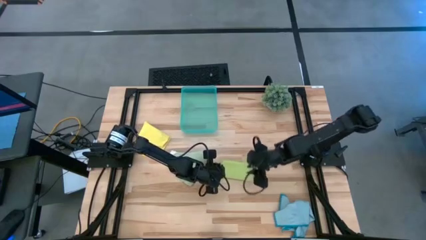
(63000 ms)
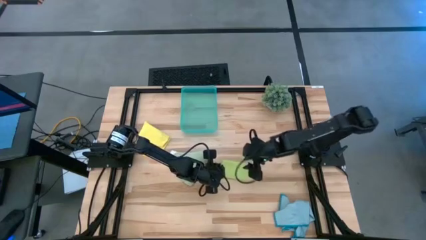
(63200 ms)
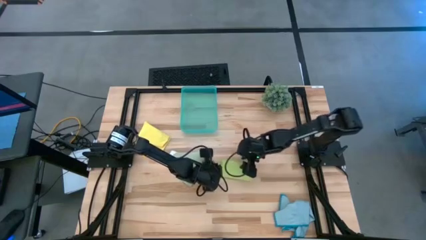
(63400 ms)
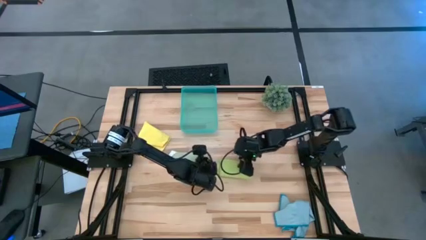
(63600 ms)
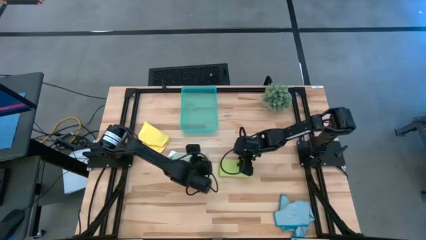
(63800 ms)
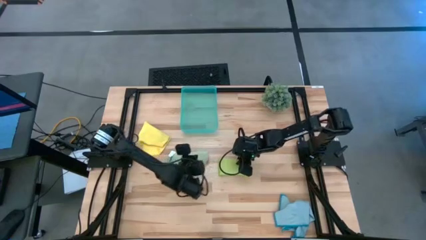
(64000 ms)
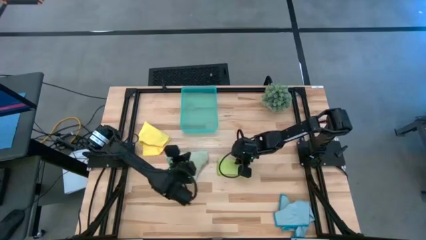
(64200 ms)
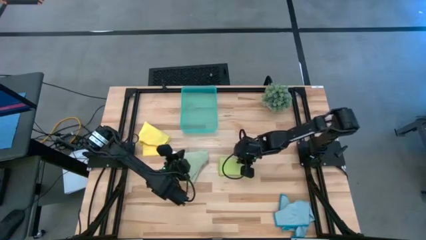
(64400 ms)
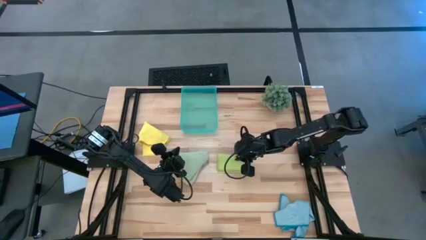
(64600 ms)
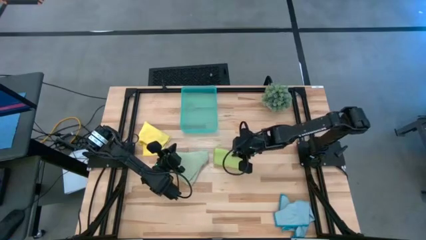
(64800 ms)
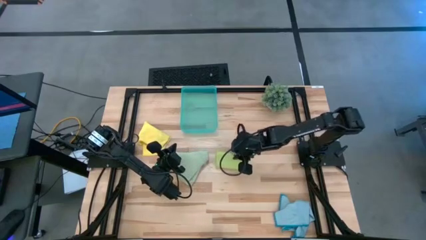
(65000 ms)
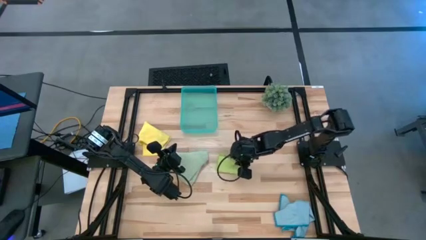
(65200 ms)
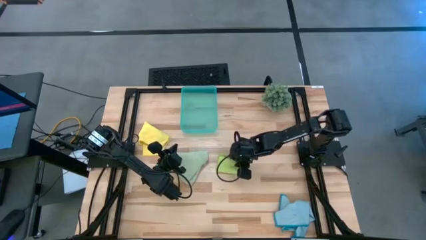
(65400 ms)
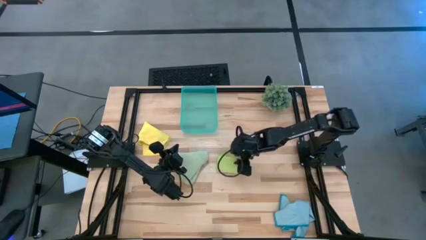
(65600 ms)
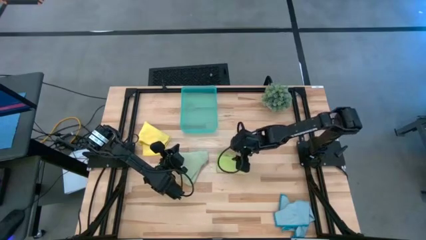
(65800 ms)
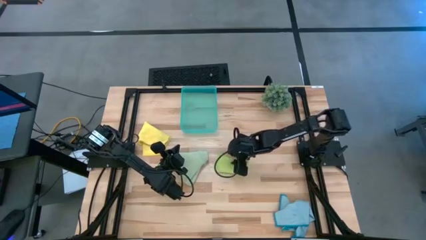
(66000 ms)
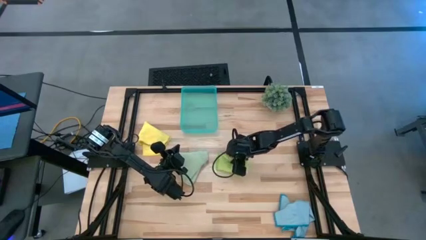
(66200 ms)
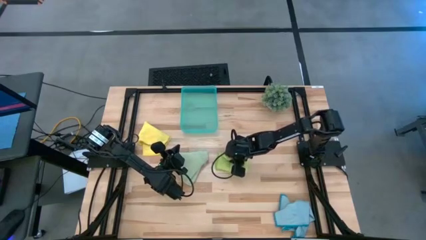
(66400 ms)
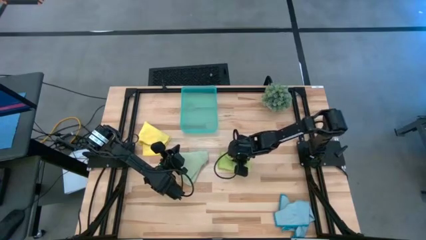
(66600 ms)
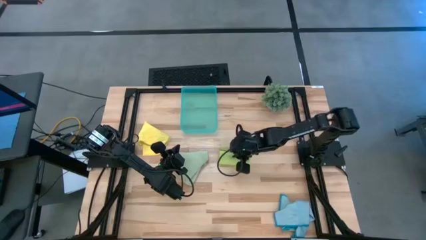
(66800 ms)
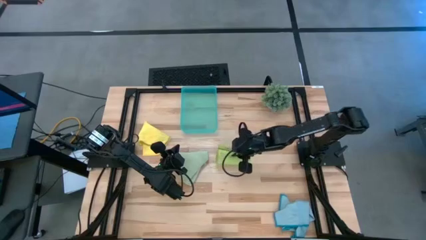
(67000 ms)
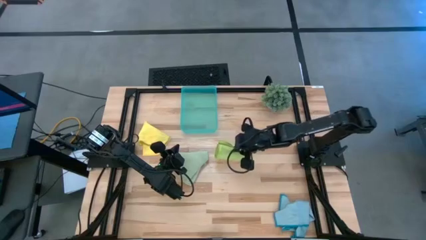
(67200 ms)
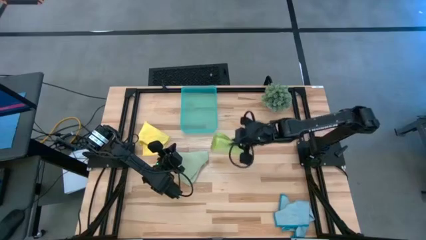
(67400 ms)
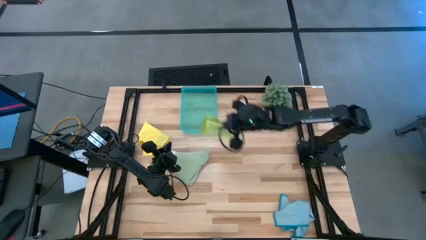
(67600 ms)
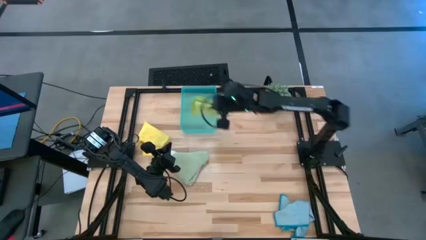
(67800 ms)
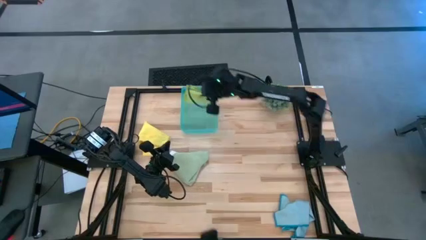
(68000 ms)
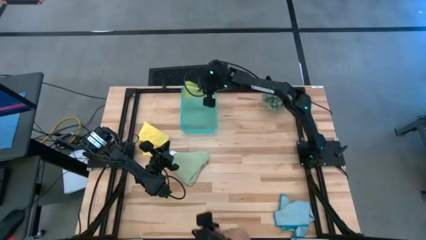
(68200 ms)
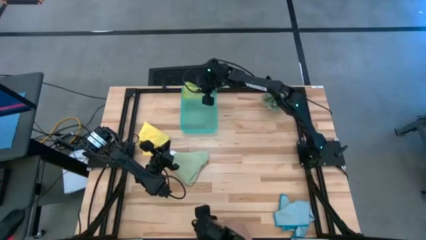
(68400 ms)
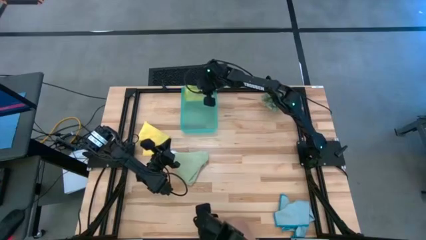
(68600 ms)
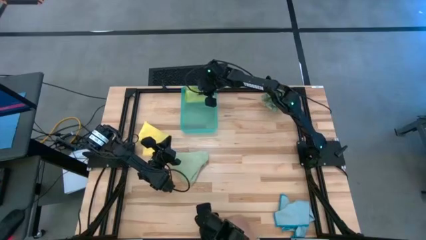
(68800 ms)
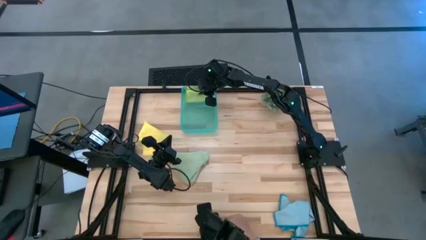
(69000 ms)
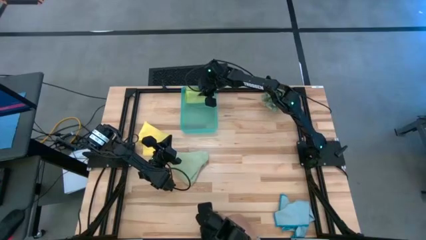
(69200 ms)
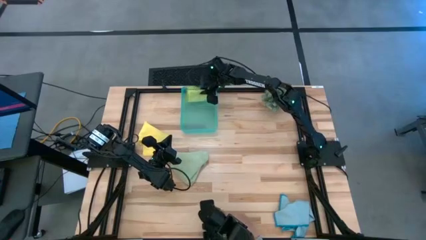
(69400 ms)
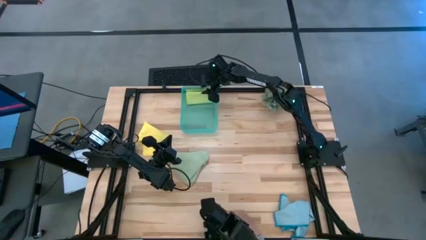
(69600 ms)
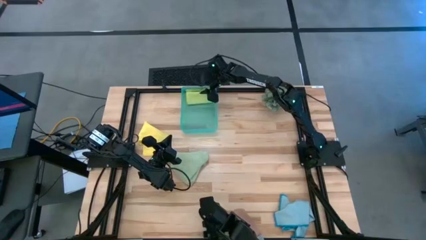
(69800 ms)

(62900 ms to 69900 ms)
Task: Fold microfiber towels
Put the light green microfiber cloth into the green bin

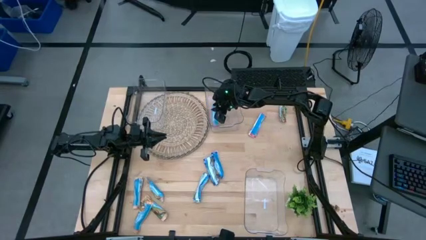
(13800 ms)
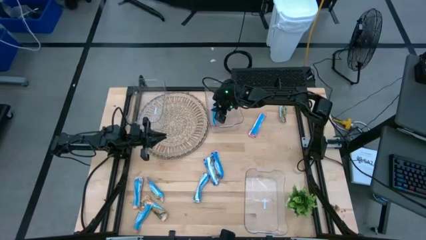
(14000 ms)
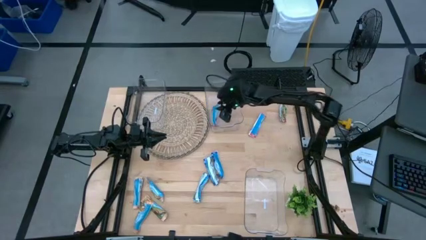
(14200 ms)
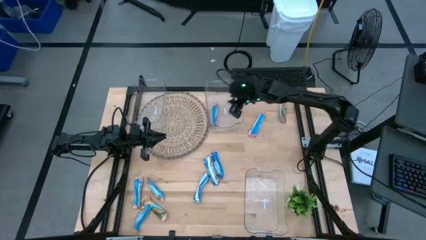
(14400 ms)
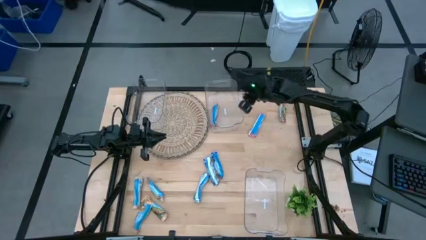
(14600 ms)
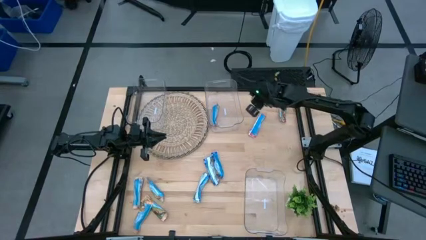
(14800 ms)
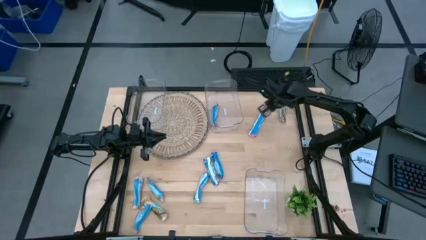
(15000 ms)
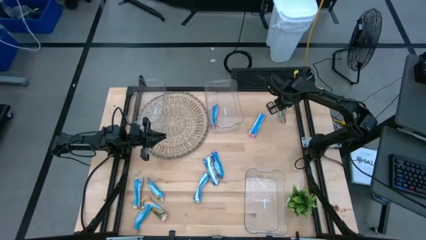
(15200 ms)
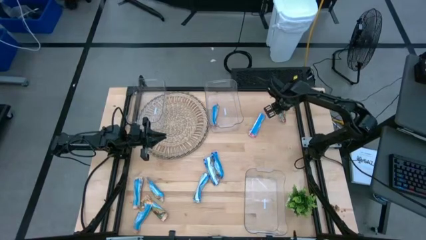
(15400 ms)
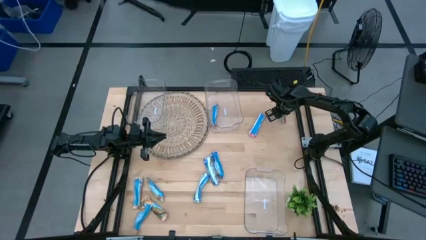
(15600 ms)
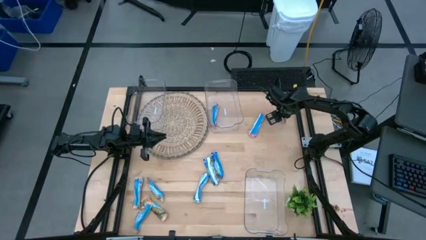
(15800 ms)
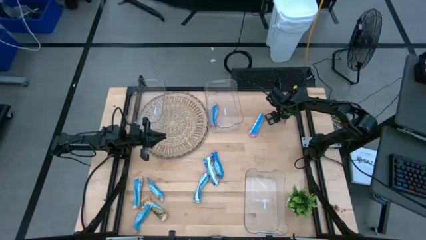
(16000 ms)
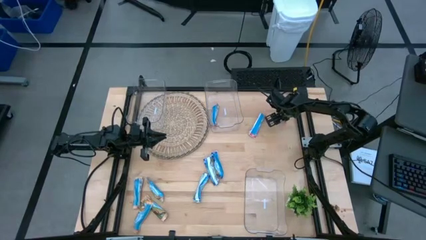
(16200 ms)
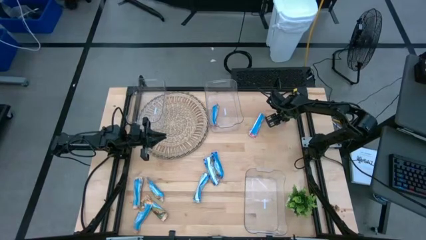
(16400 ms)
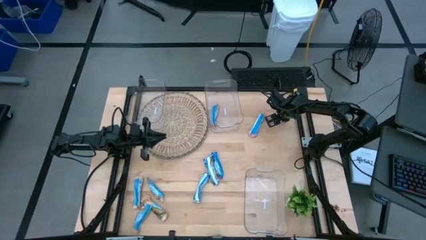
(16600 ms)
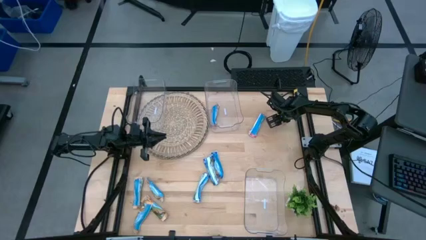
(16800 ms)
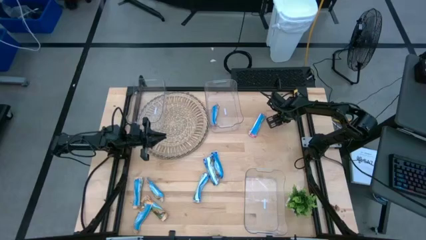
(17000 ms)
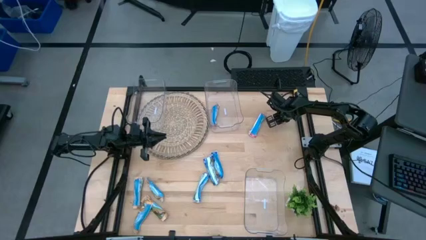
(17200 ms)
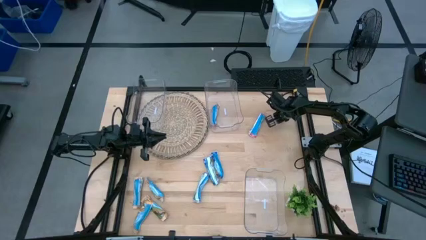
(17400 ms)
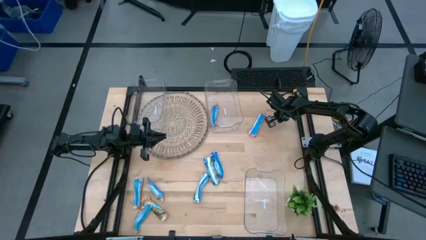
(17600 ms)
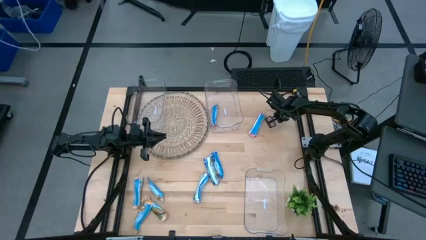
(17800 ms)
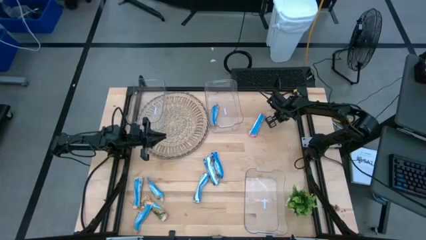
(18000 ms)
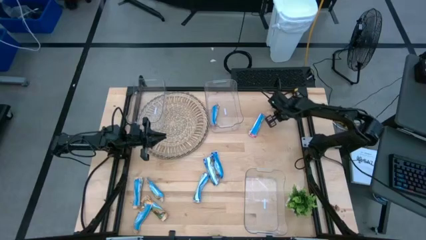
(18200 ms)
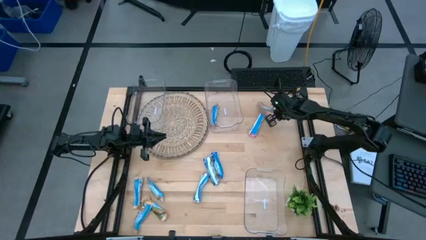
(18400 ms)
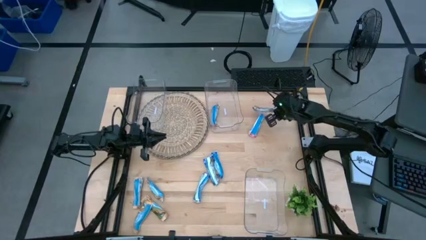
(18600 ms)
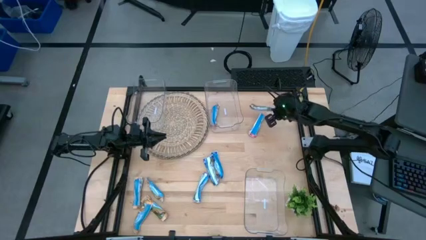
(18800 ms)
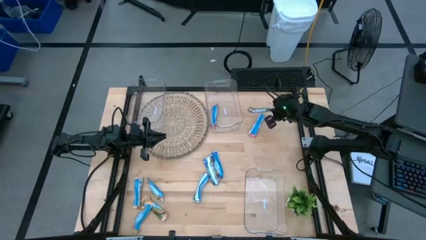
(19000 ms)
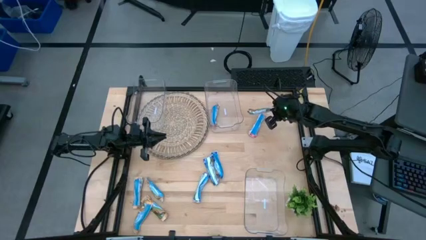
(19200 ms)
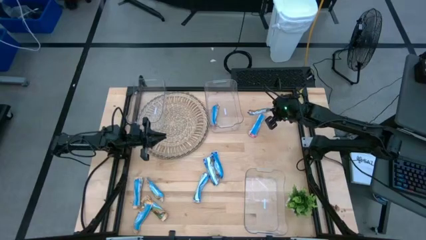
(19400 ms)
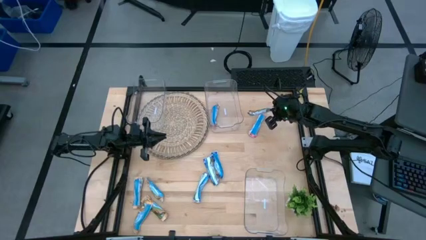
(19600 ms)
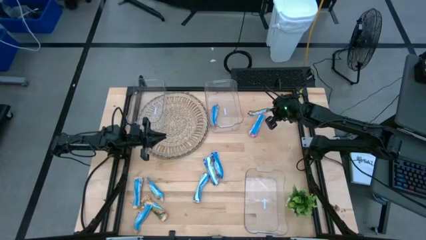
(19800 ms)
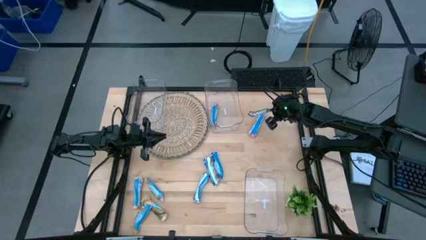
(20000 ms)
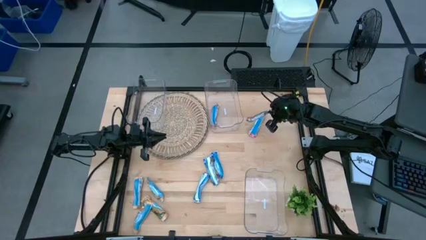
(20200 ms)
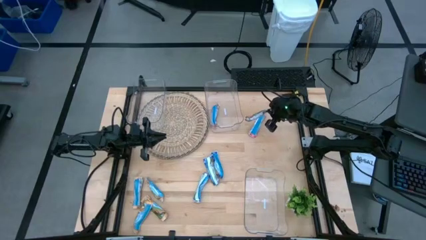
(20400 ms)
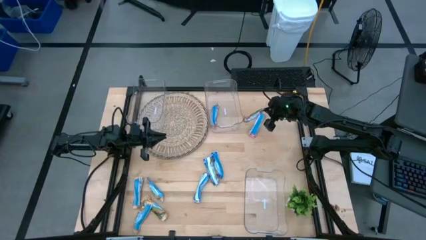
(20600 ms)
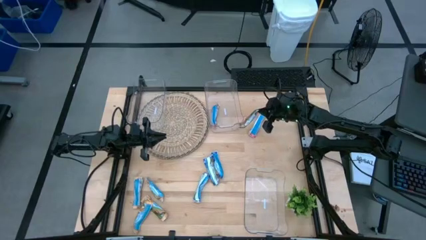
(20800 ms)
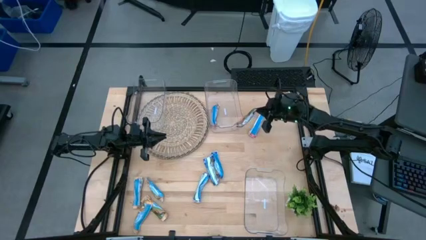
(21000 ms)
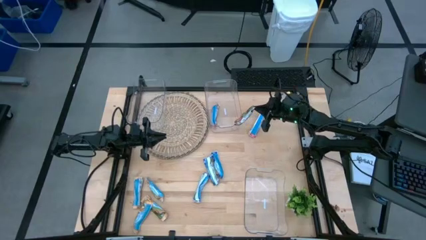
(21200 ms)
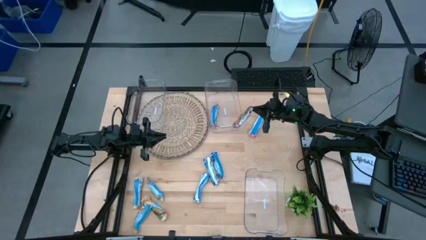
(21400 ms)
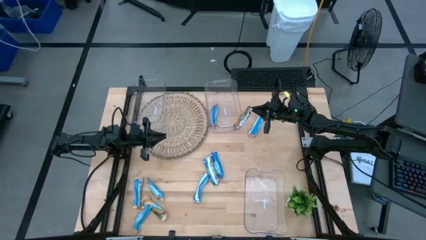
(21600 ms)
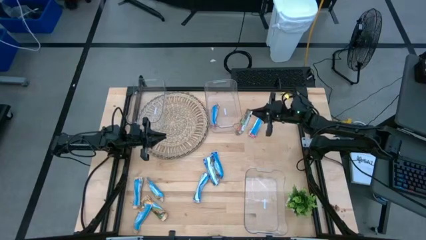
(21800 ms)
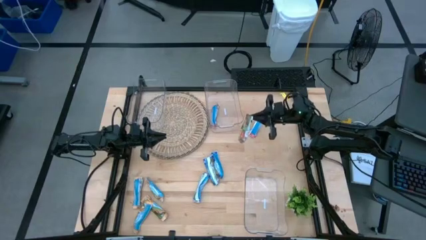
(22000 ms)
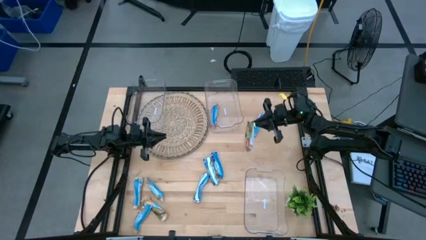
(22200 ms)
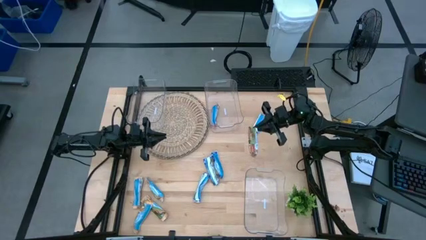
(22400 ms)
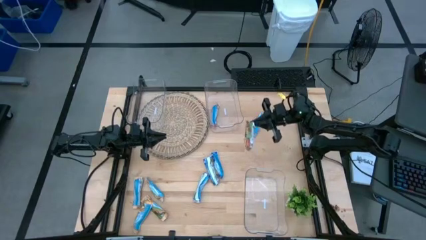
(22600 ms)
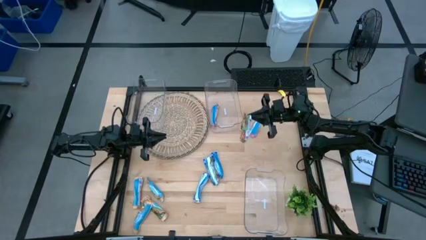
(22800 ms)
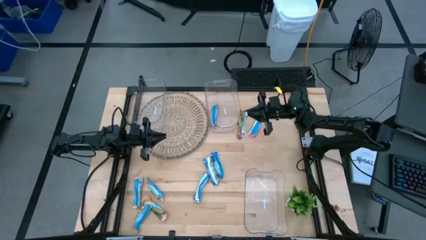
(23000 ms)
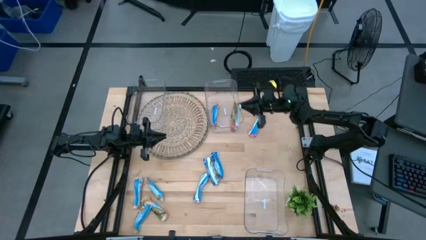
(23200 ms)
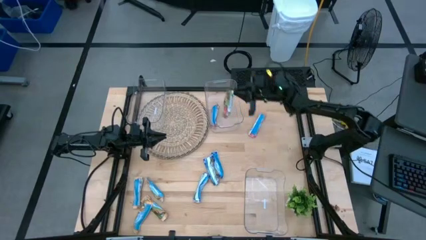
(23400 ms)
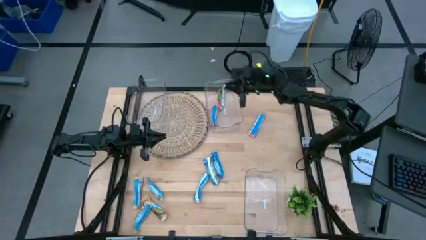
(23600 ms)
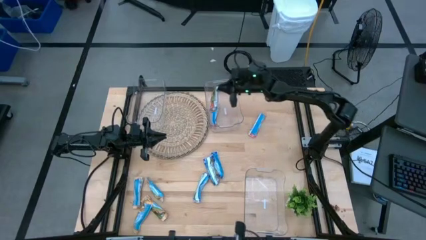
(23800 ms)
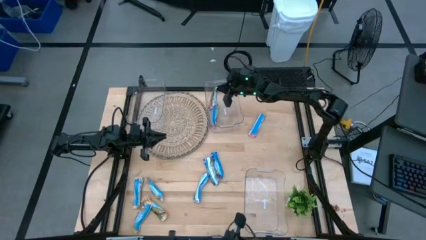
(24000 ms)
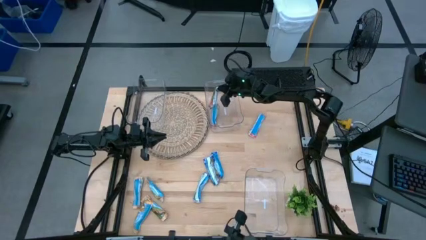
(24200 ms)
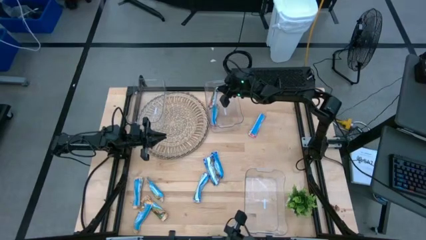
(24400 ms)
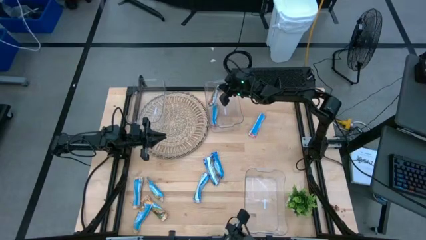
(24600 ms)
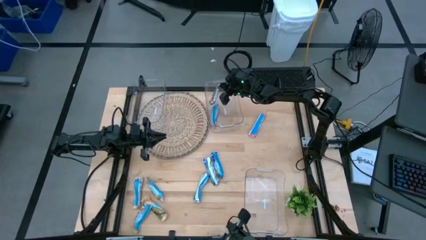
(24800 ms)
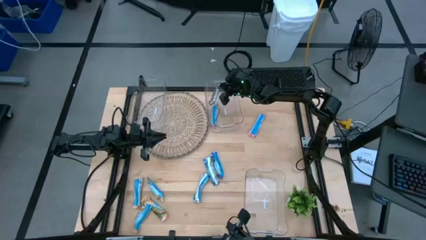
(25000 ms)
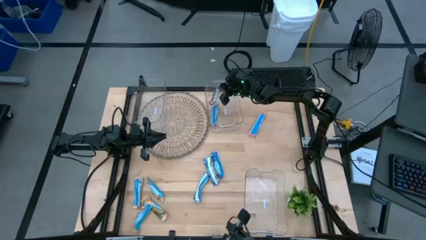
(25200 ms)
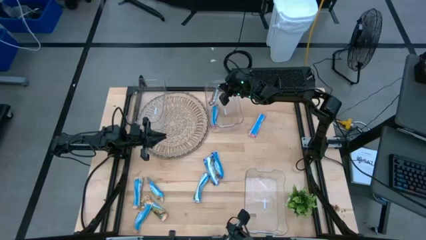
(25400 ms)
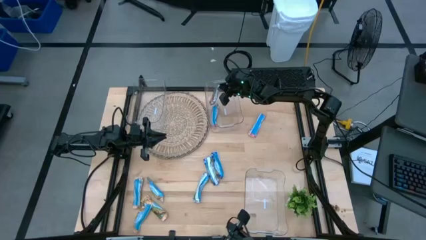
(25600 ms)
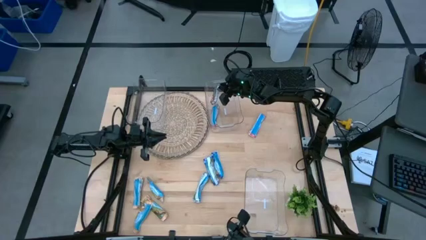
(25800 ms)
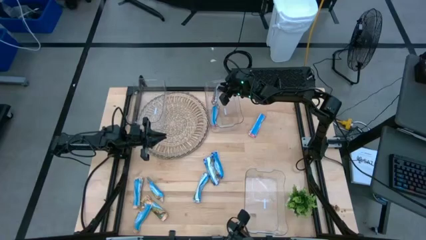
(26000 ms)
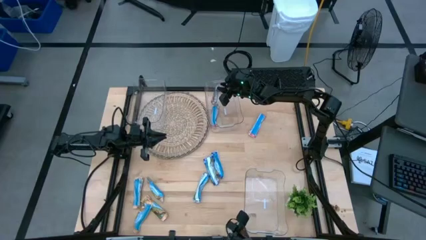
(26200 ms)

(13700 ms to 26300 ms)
Task: Pick and place Granola Bars by type
Put the red granola bar into the top right transparent bin
